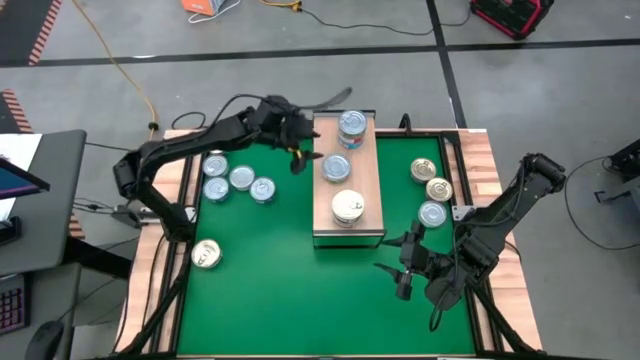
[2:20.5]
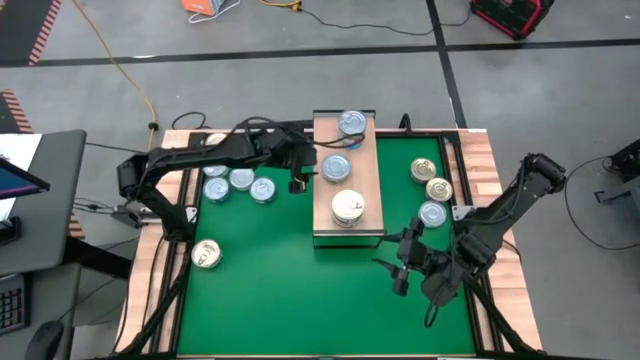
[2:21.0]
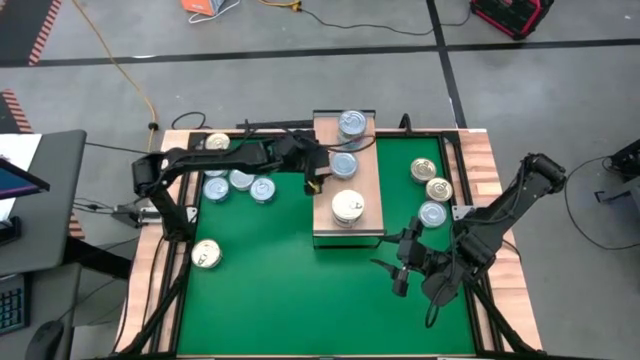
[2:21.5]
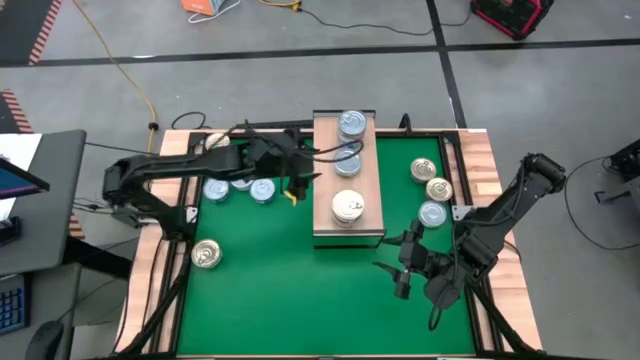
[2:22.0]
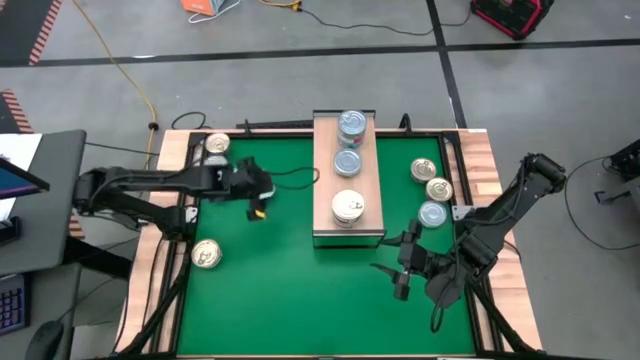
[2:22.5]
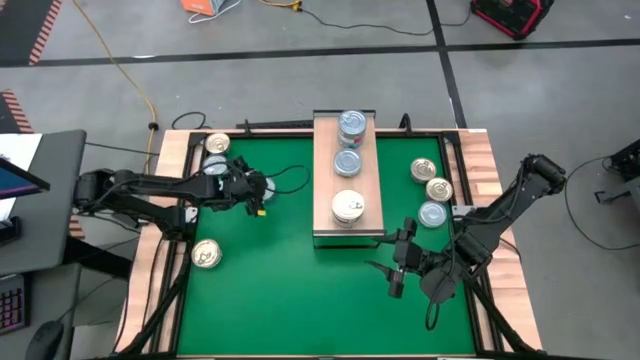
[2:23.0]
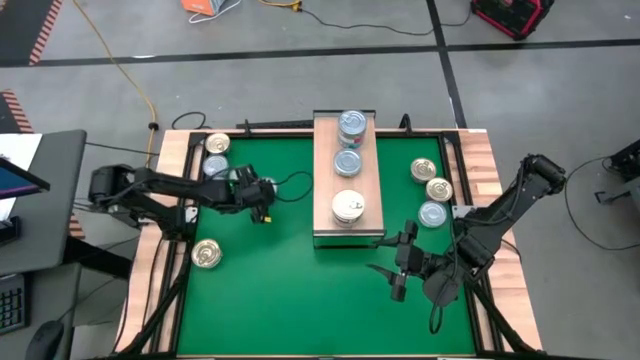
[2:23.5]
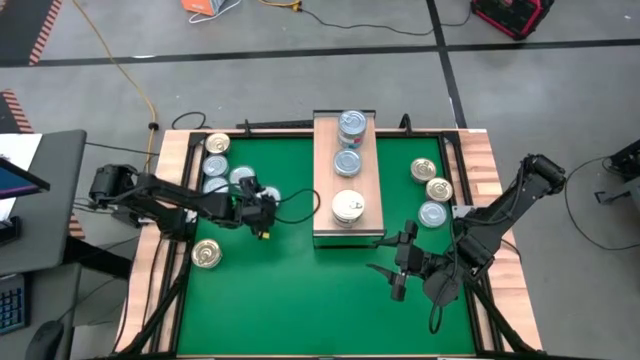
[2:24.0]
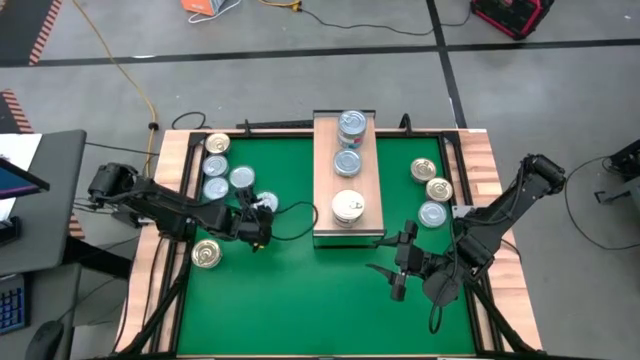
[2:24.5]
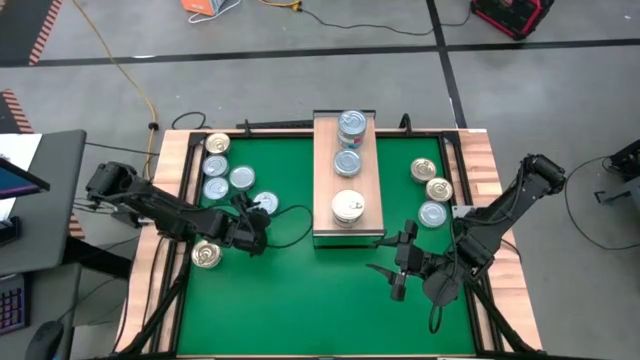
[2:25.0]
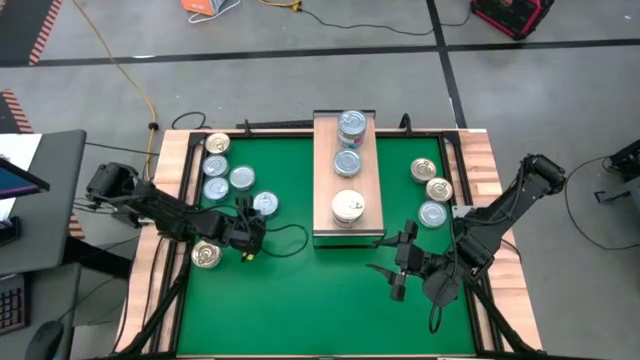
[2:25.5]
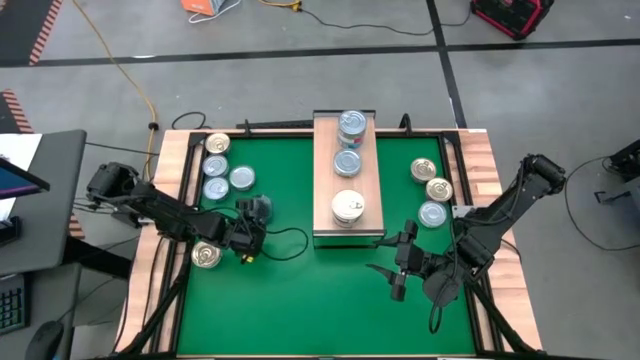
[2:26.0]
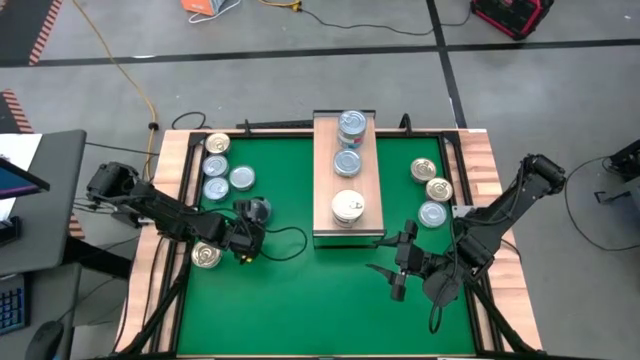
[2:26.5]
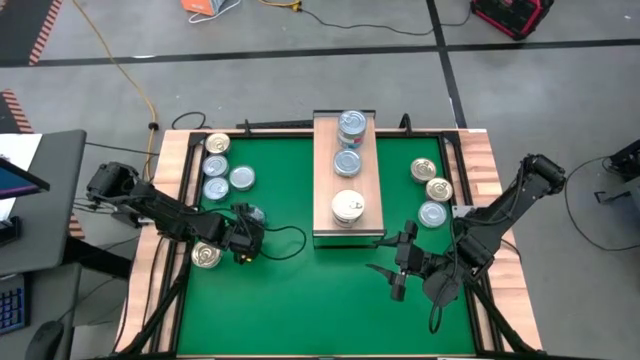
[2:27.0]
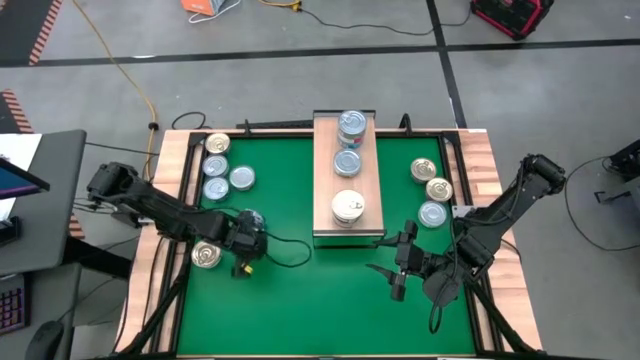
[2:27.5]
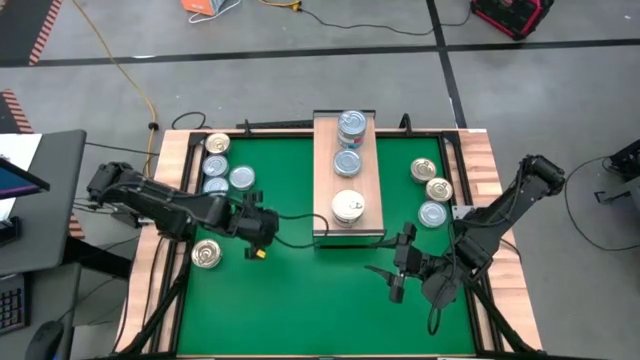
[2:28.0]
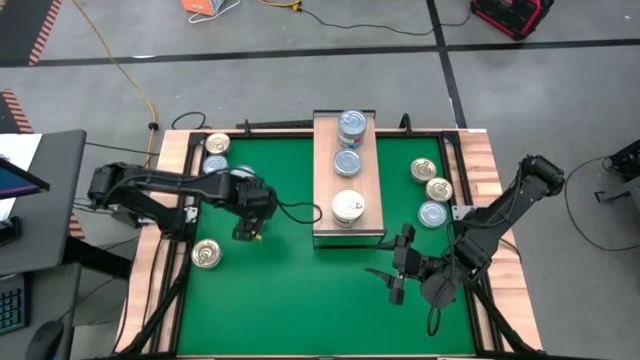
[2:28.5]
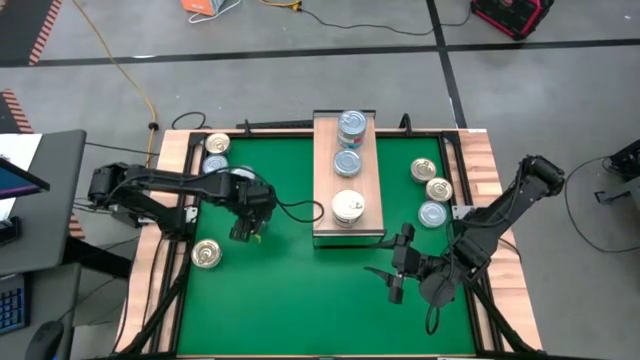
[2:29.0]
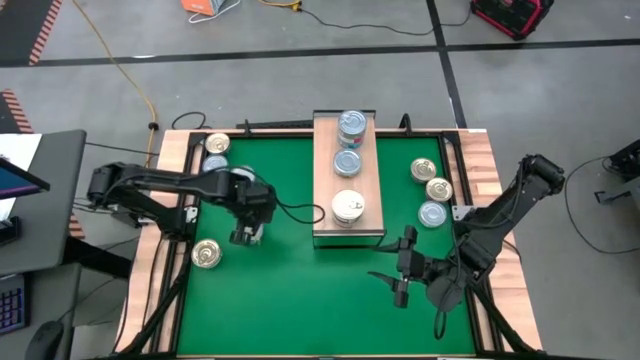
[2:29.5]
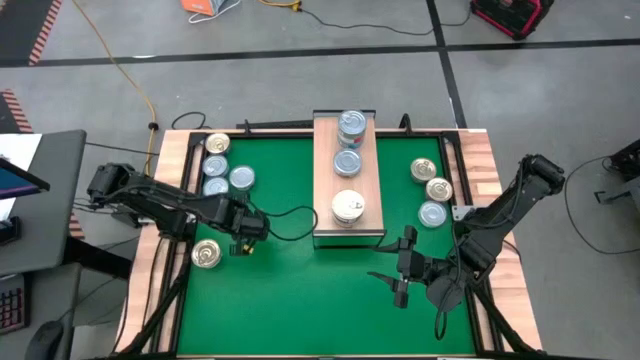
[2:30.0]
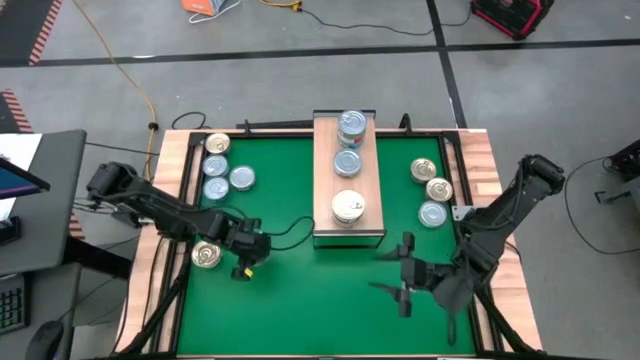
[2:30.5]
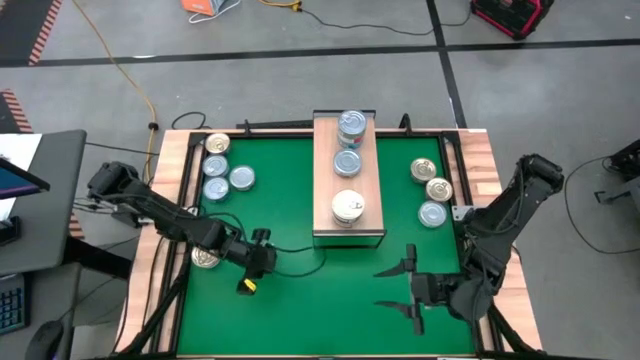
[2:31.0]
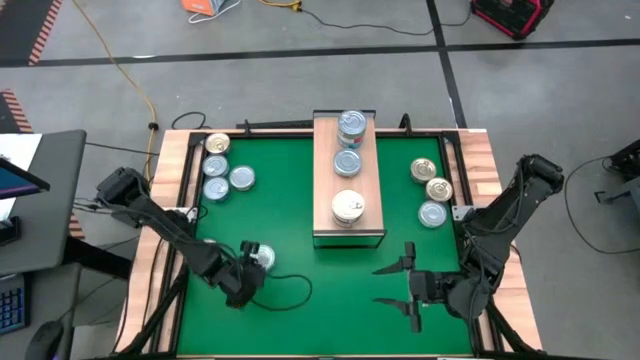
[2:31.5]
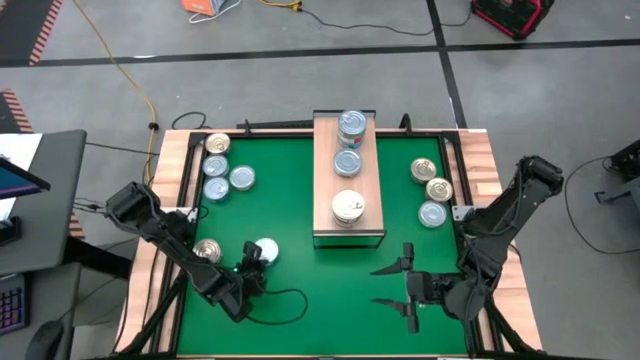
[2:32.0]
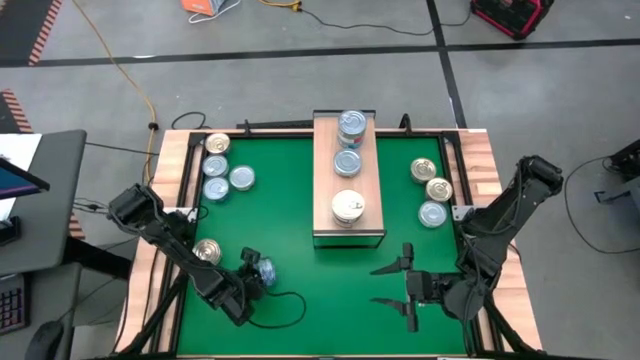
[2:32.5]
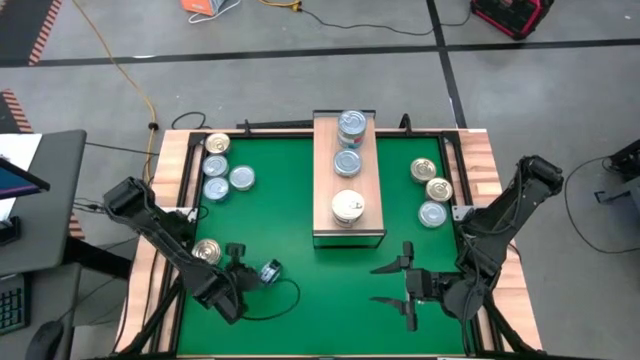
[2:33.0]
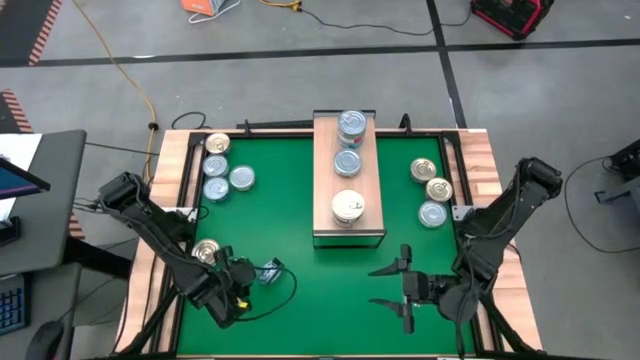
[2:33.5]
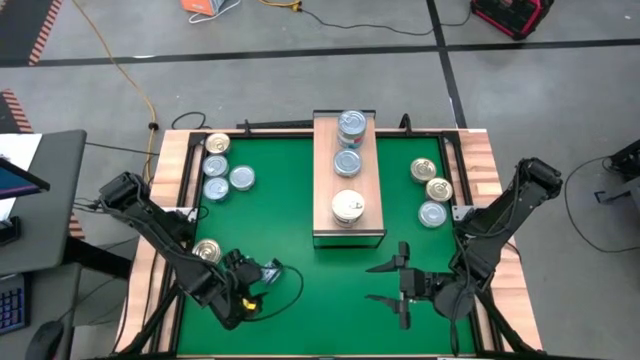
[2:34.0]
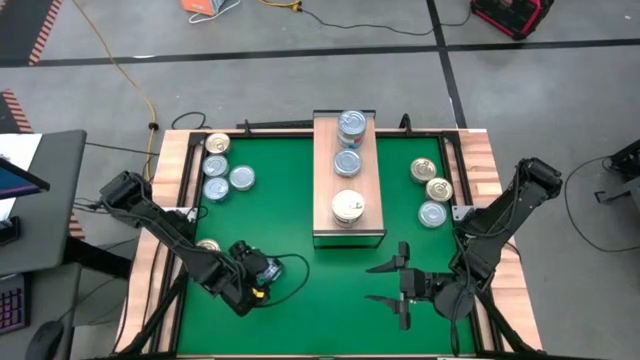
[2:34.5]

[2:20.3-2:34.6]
Task: Stack canned seafood by type on shelf
Stack the blue tuna can on top of the green tuna can on the shelf

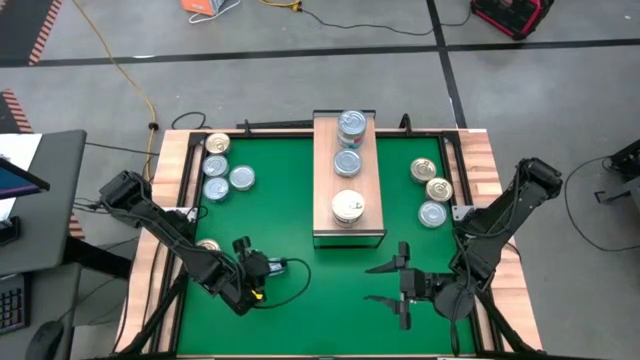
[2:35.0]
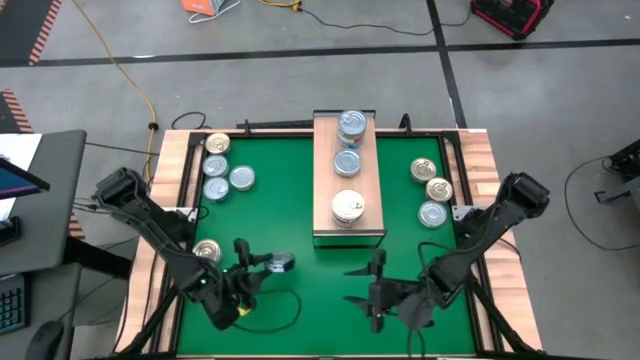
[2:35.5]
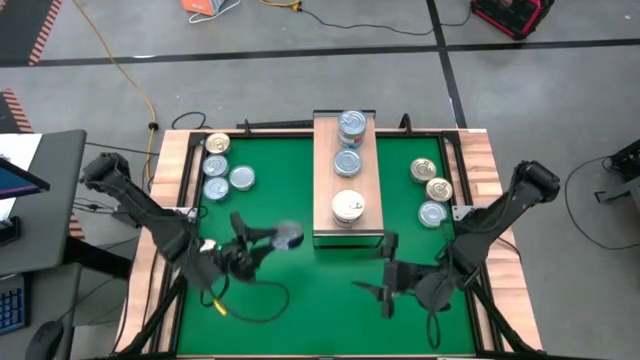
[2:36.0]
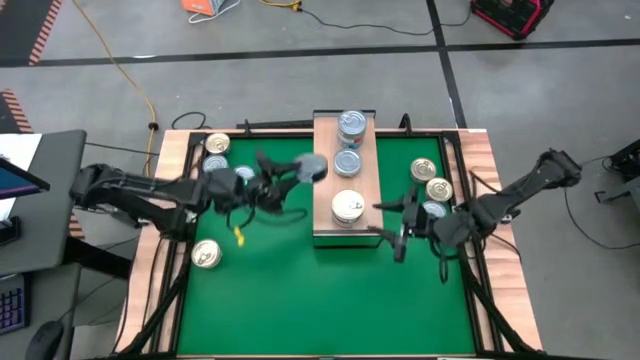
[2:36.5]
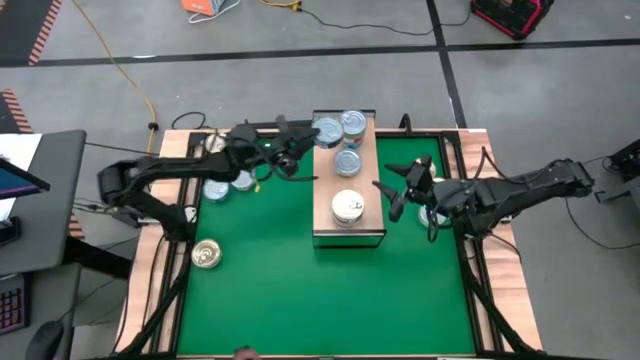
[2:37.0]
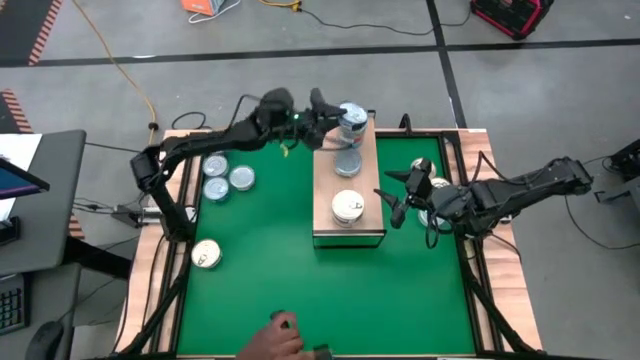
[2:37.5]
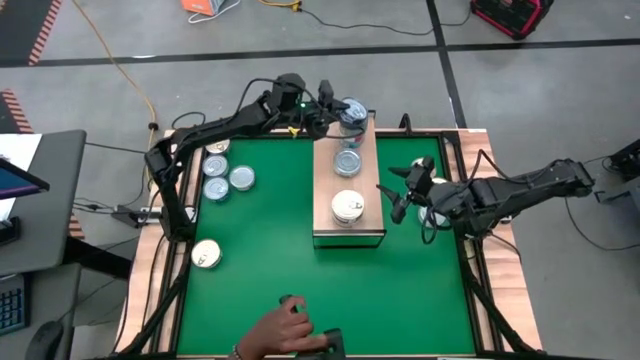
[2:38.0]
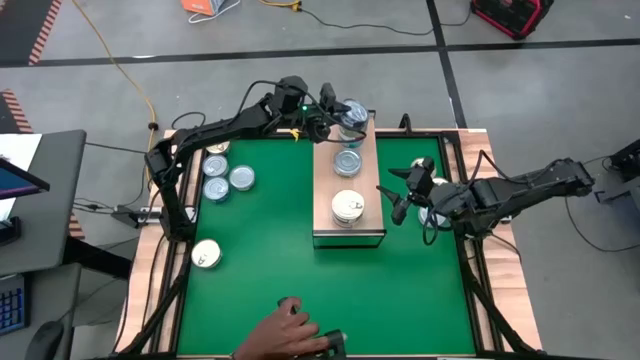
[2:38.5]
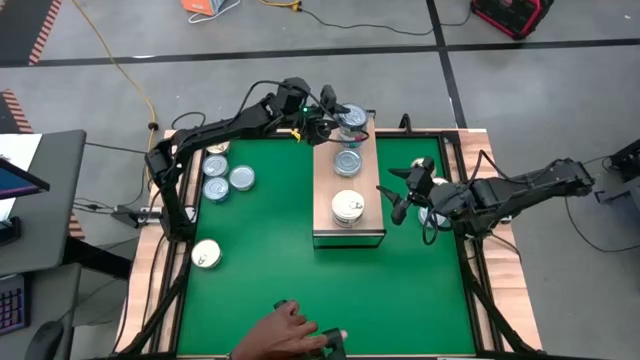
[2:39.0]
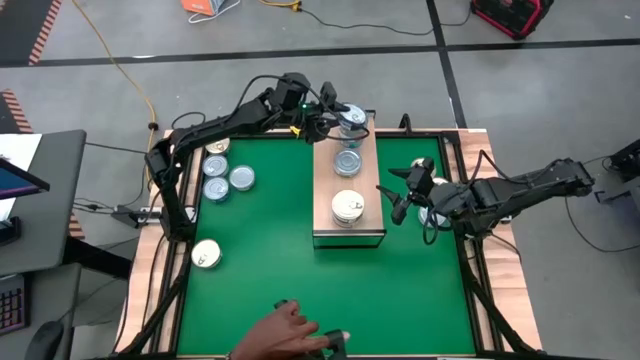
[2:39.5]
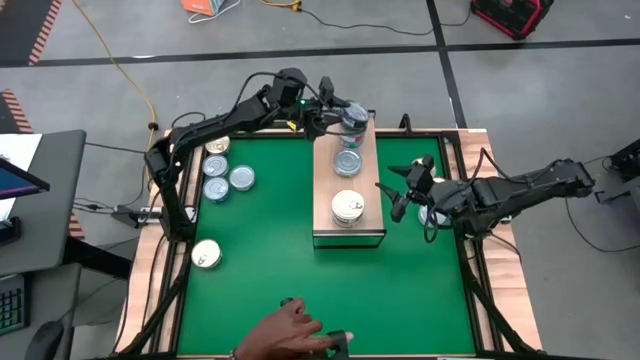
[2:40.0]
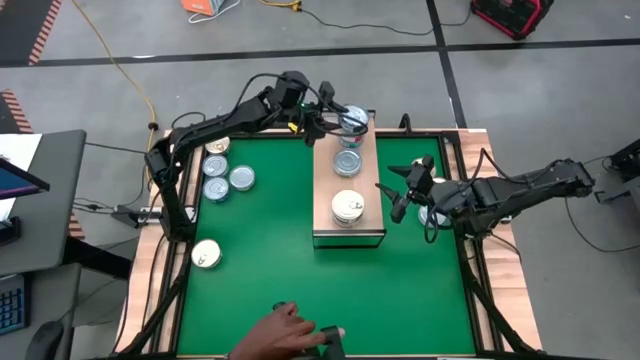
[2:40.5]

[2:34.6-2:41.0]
Stack the blue tuna can on top of the green tuna can on the shelf

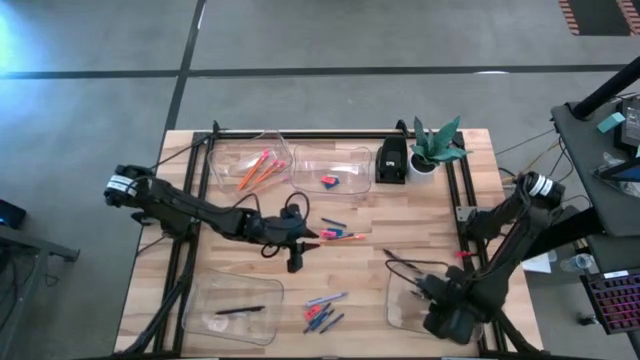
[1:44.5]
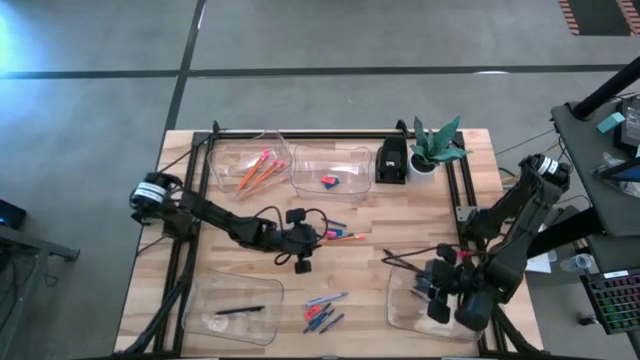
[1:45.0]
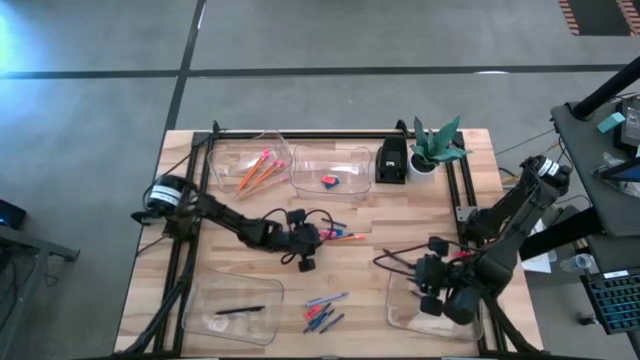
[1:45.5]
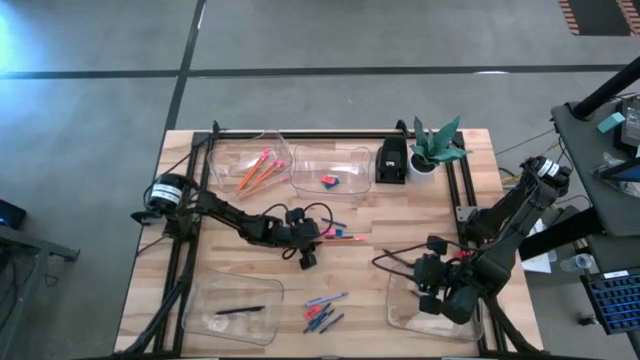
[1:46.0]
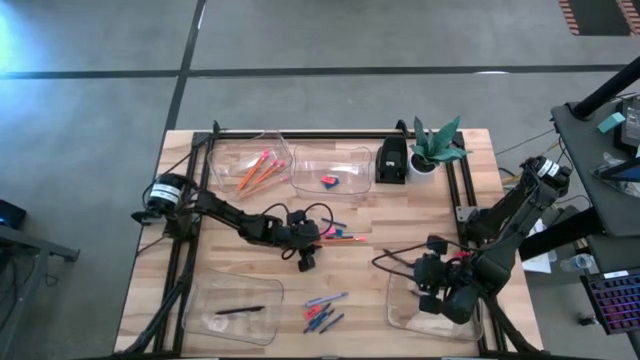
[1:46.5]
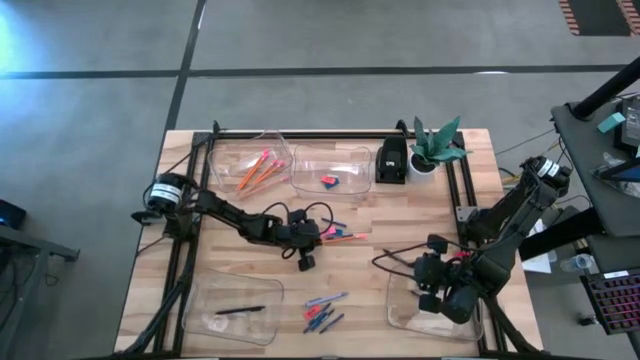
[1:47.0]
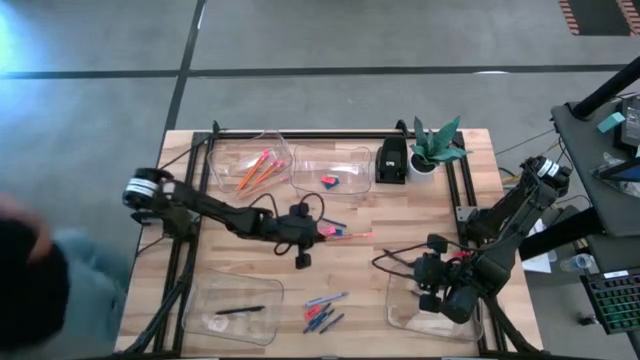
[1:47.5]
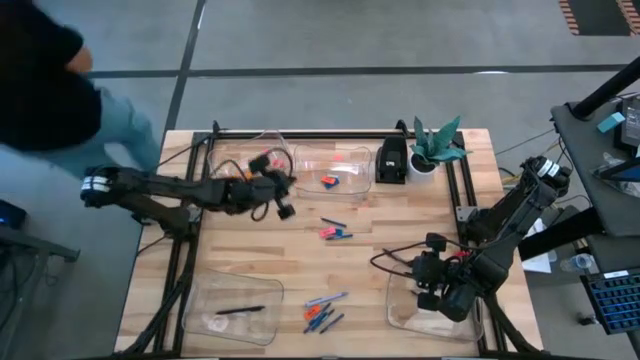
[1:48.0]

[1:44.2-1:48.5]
Task: Sort crayons/erasers/pens/pencils in bins
Put the orange pencil into the top left transparent bin
